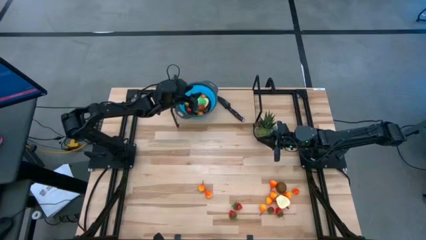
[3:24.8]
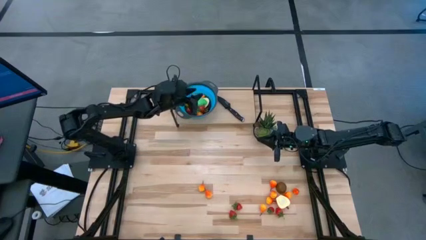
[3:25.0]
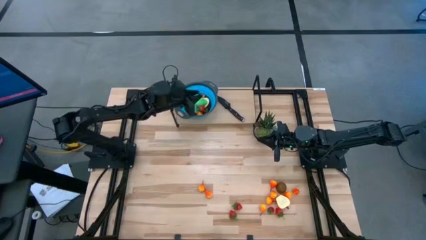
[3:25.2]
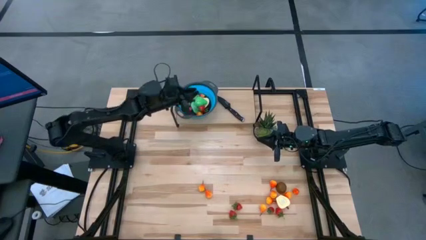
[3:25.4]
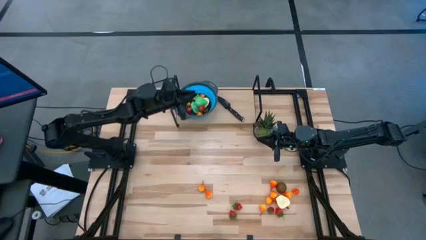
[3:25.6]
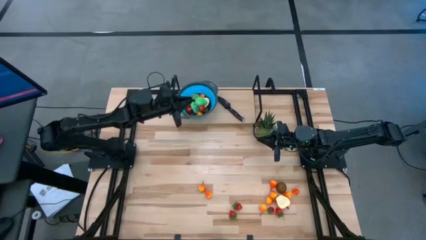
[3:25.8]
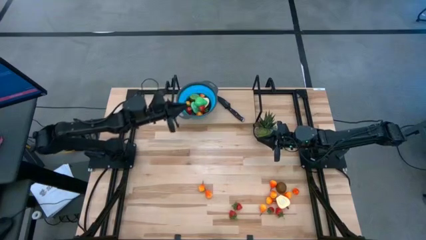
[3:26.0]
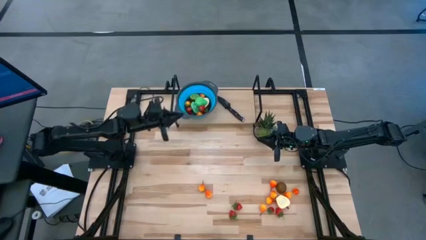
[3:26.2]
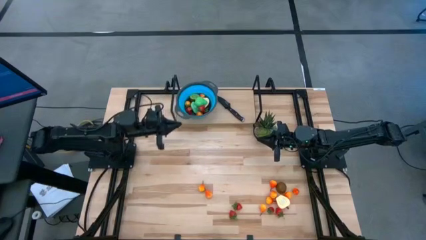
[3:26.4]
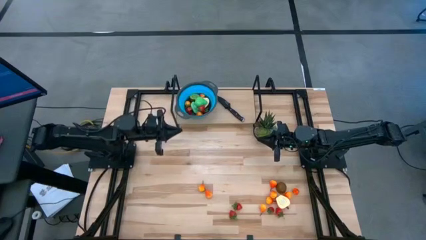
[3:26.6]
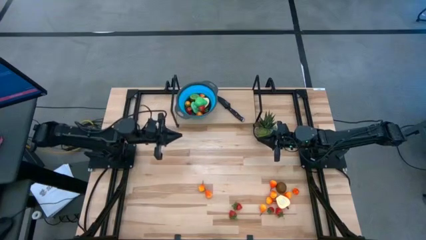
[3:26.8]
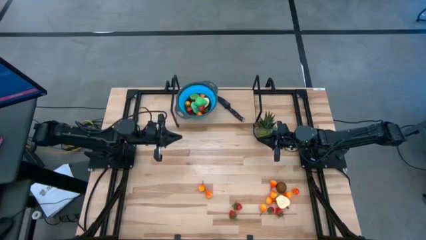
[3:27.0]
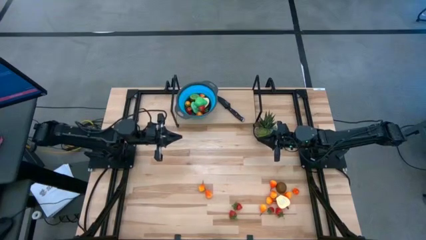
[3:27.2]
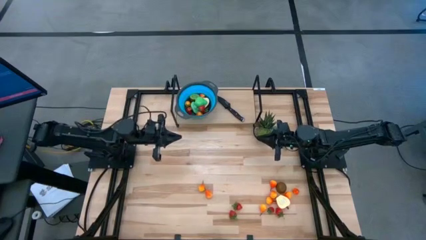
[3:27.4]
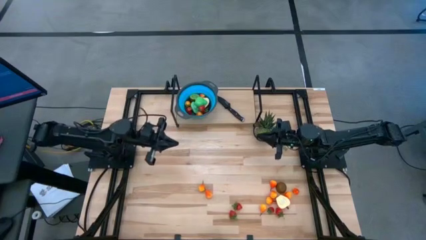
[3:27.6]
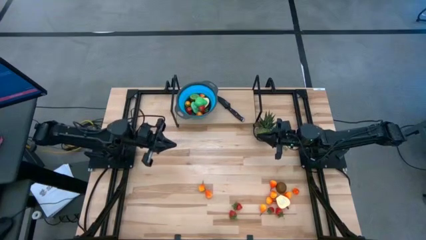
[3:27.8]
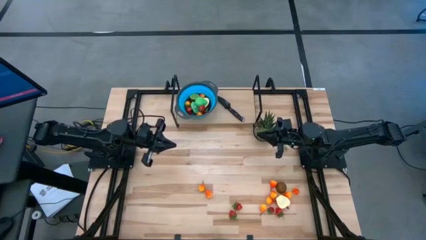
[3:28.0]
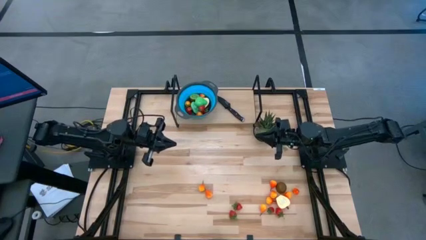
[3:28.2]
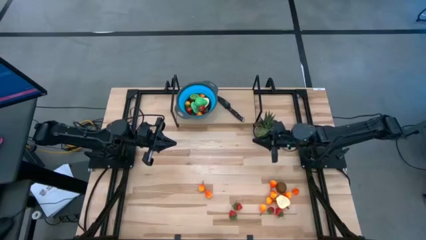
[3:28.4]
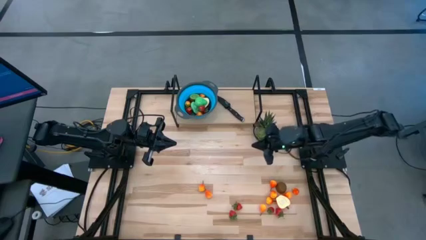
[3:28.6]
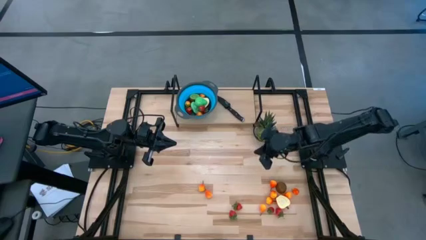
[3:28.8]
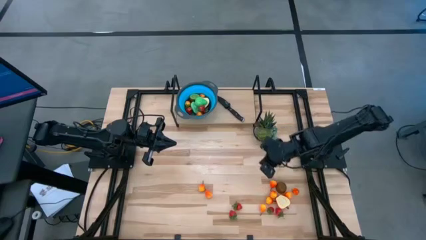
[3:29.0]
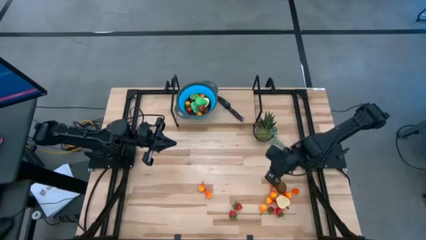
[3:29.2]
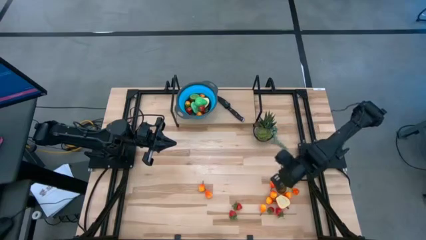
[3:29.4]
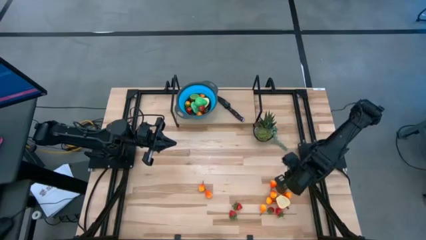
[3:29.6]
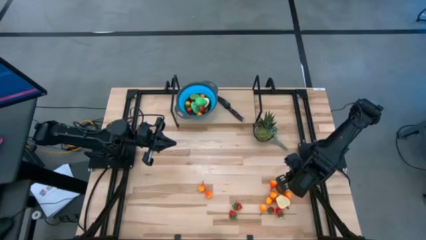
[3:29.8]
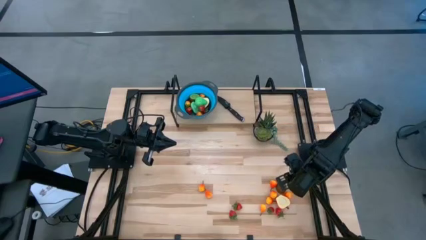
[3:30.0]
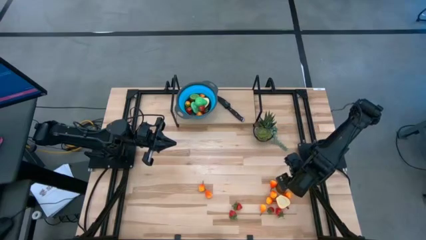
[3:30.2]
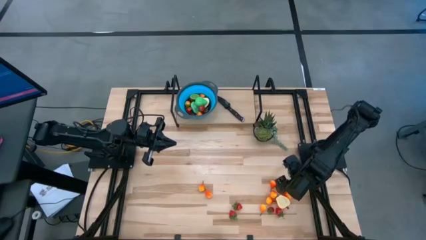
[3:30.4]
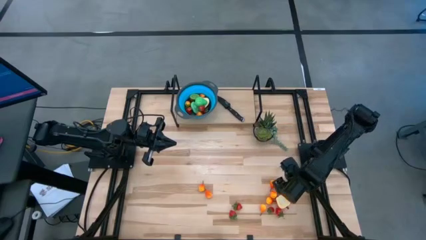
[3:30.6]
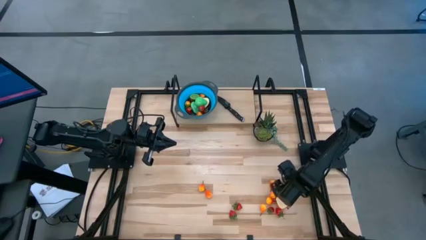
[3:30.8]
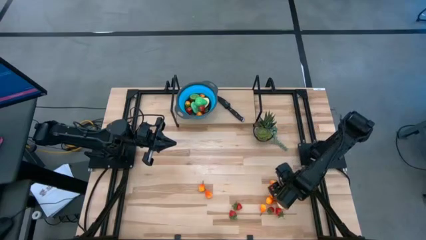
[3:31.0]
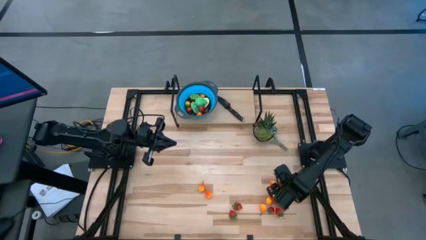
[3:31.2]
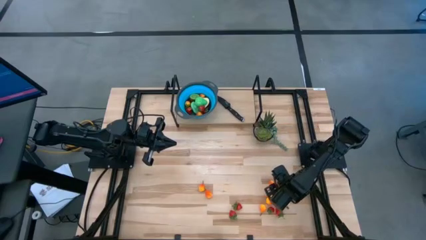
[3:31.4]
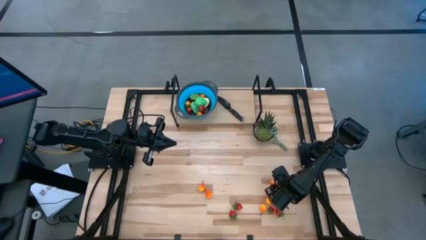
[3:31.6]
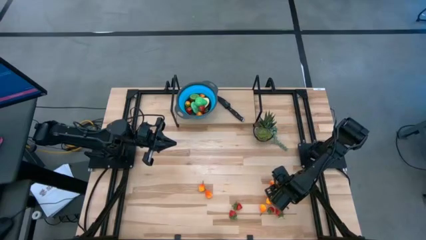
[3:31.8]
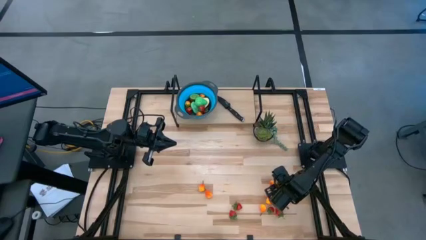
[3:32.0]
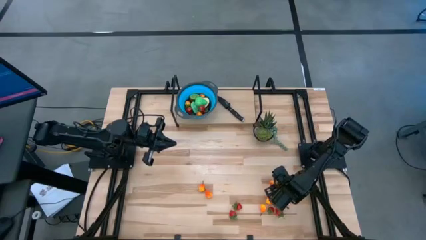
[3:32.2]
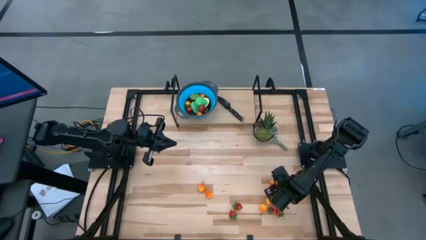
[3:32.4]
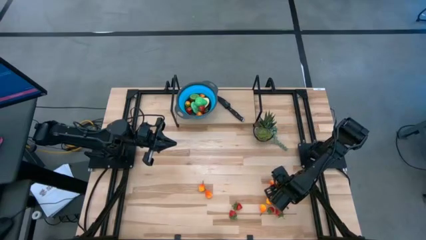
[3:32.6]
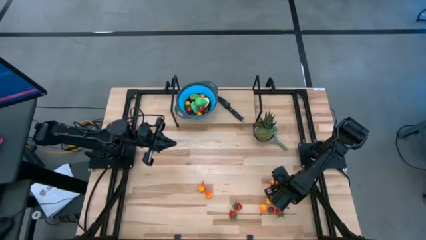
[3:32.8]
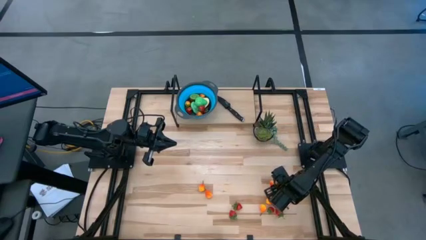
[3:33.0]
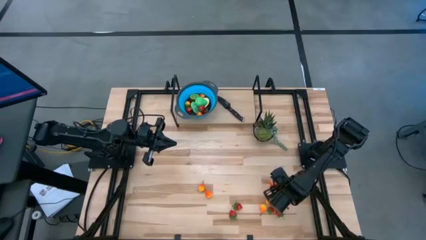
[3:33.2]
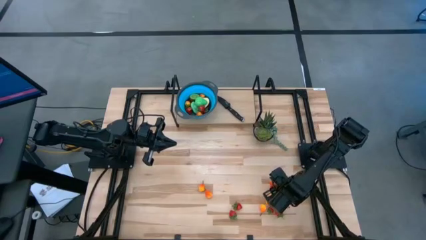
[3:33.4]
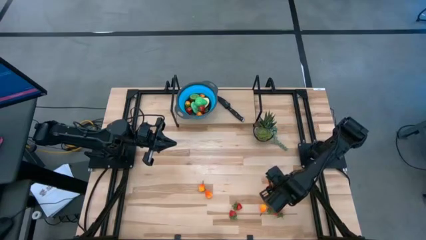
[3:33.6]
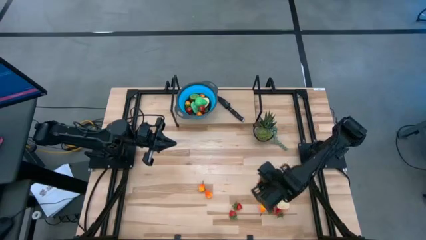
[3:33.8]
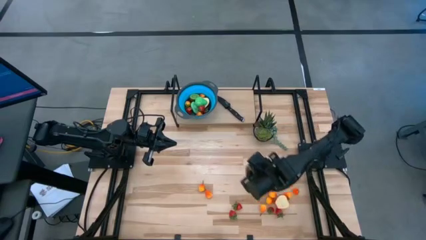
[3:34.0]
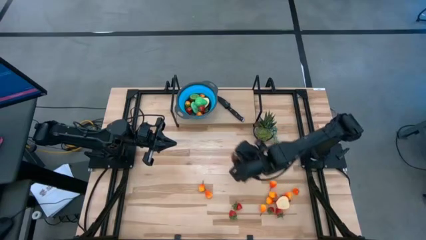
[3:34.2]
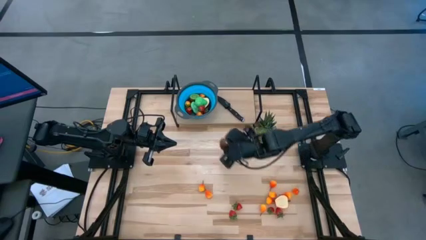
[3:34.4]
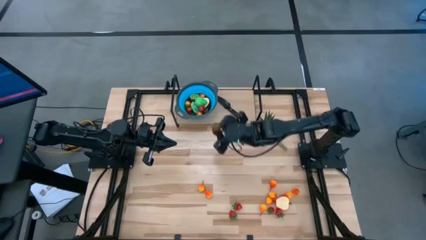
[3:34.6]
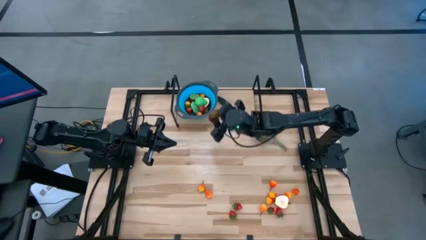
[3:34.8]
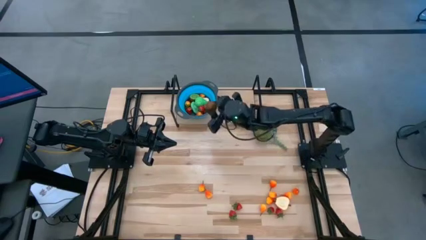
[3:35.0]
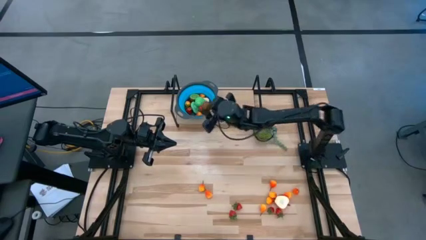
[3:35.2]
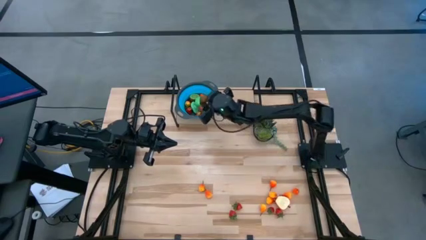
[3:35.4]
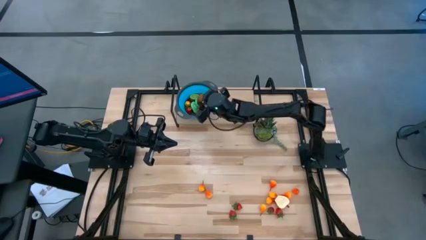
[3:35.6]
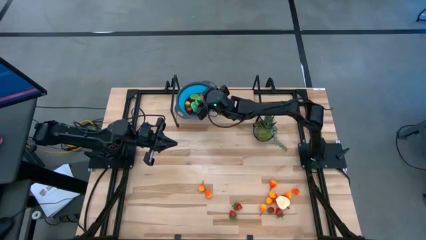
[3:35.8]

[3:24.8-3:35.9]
Task: Pick & Place Fruit
Put the kiwi into the basket

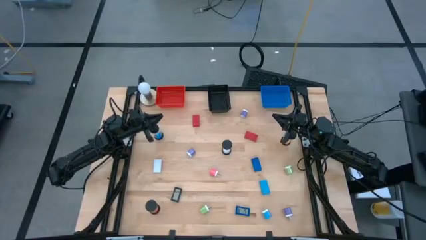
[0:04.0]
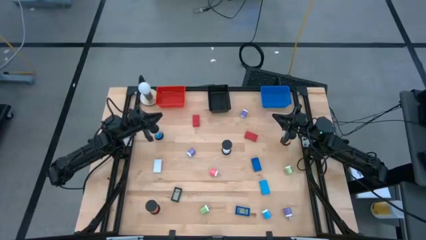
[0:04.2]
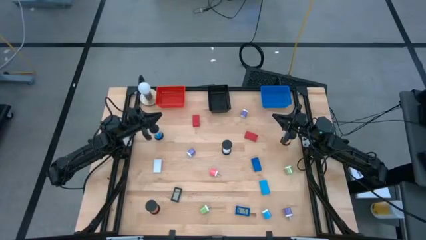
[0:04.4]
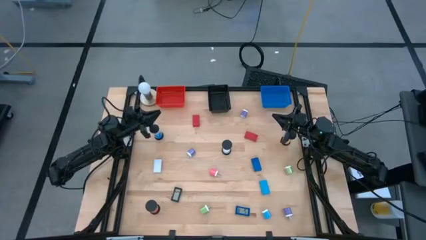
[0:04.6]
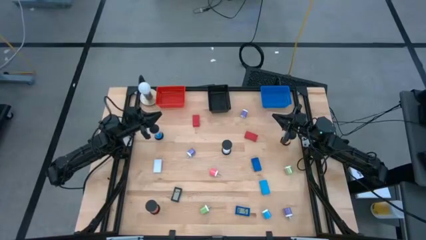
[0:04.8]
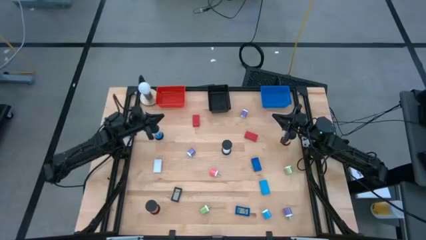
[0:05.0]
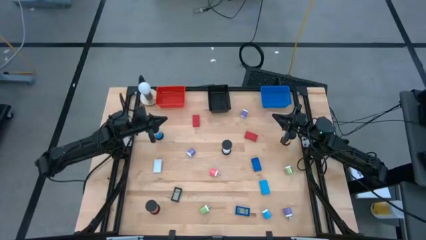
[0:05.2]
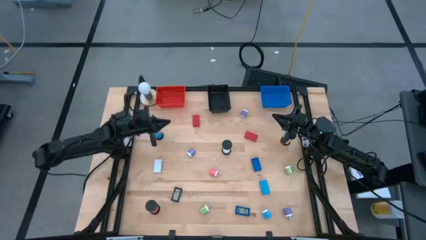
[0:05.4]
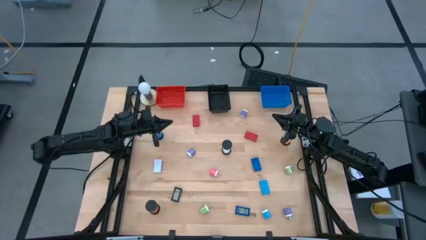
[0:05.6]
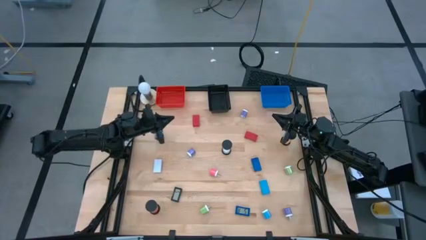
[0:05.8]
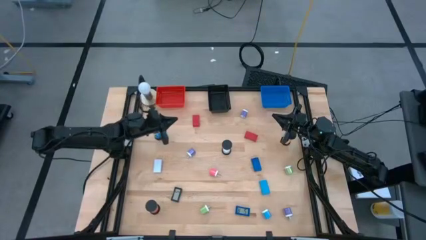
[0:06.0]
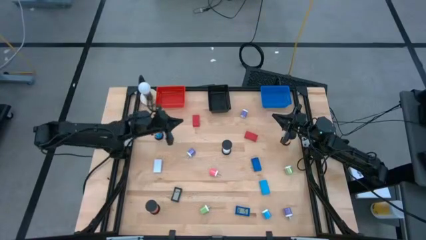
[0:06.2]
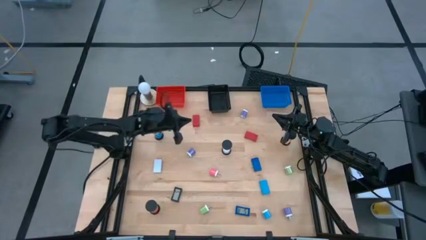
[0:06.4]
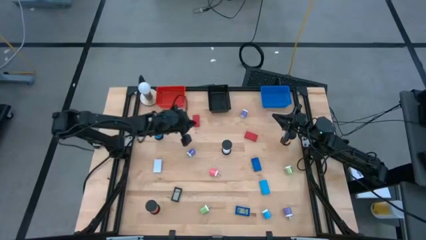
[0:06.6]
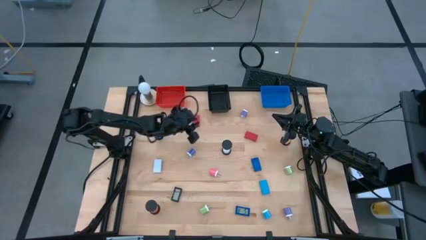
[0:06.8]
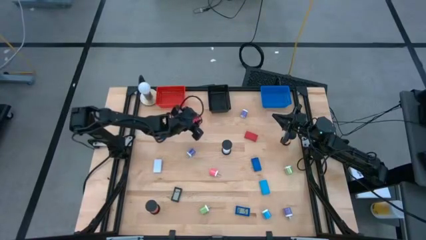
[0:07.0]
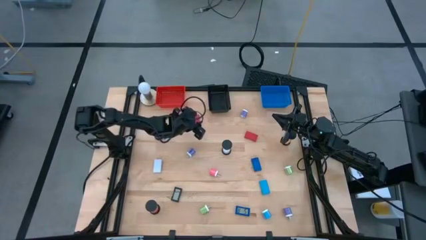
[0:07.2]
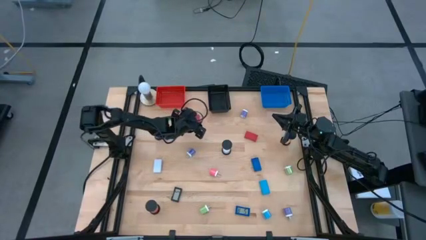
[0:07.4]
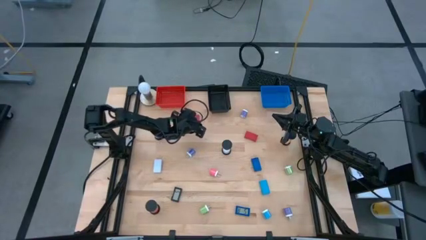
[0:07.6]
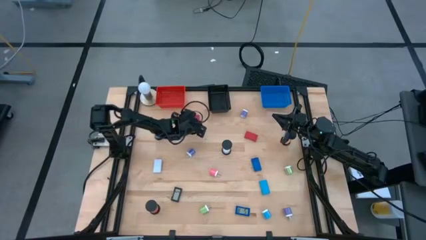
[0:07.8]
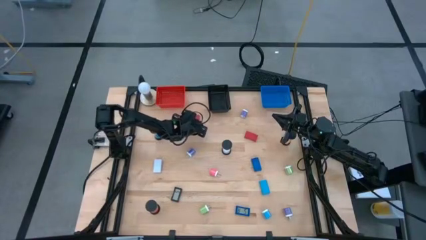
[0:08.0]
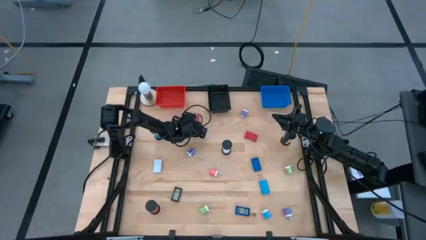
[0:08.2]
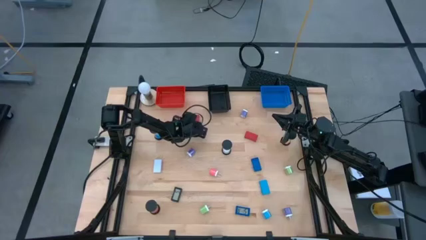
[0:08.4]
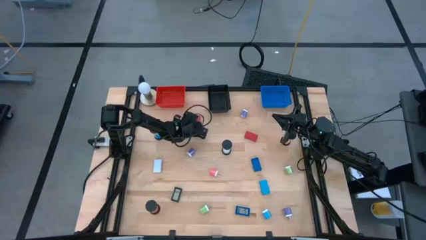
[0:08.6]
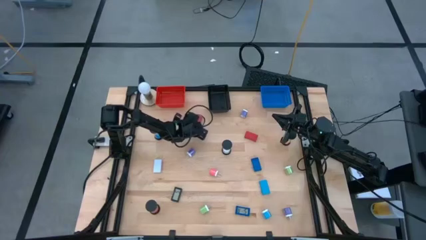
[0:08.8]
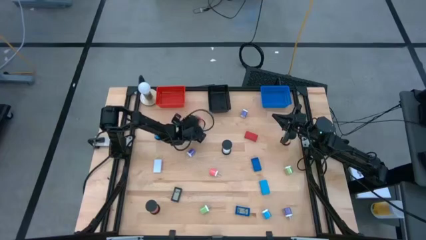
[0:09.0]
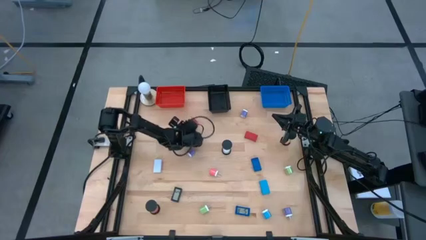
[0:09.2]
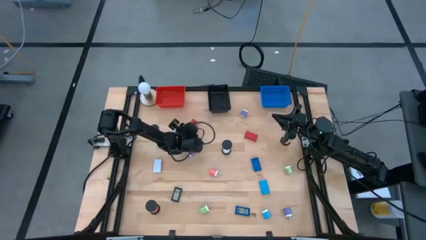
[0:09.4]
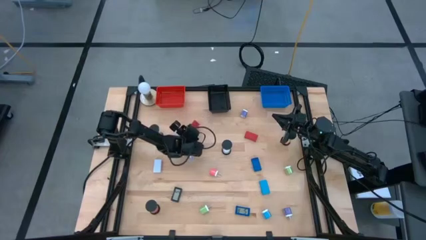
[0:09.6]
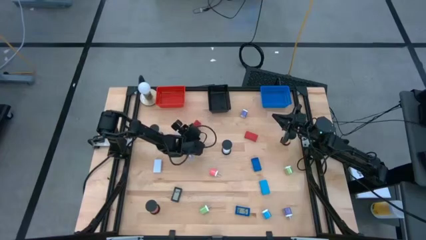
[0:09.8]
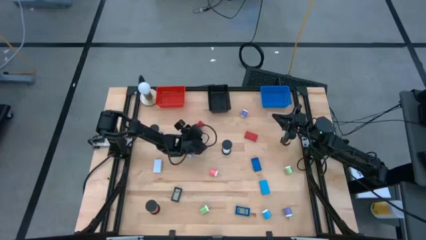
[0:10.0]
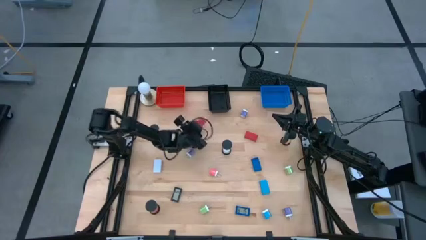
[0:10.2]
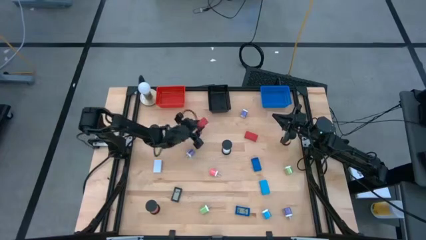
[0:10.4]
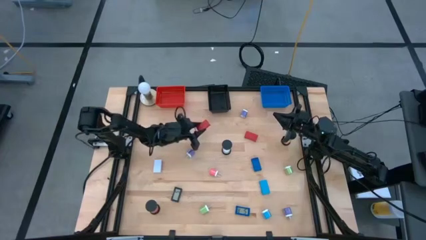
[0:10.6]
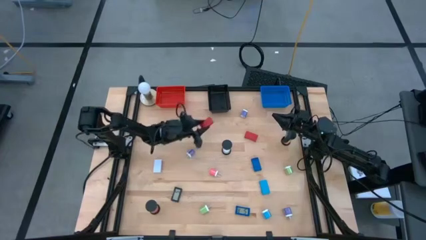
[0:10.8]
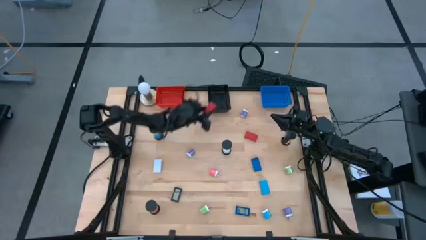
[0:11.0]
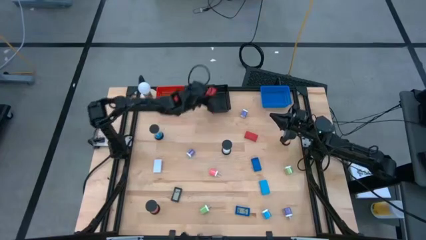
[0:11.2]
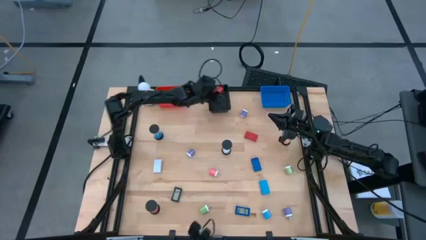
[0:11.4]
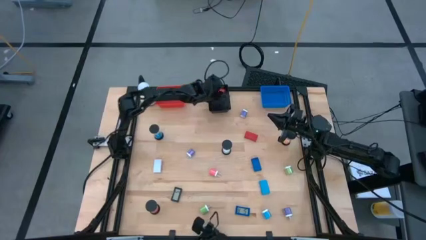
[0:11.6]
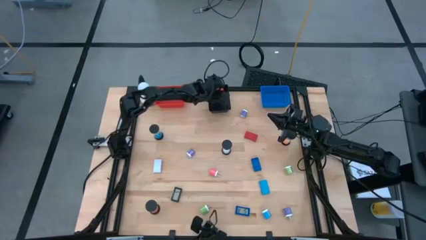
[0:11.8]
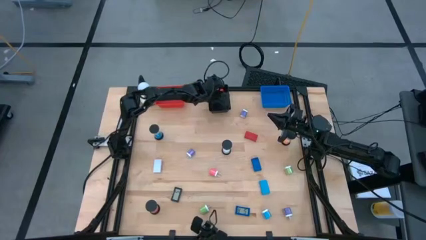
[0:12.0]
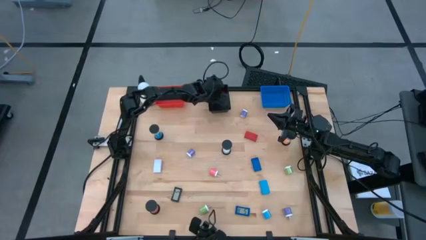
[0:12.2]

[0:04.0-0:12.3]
Task: Pick & Place Office items
Put the left red digital timer into the black bin
